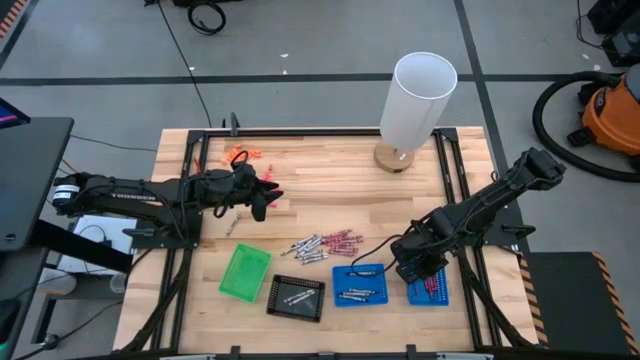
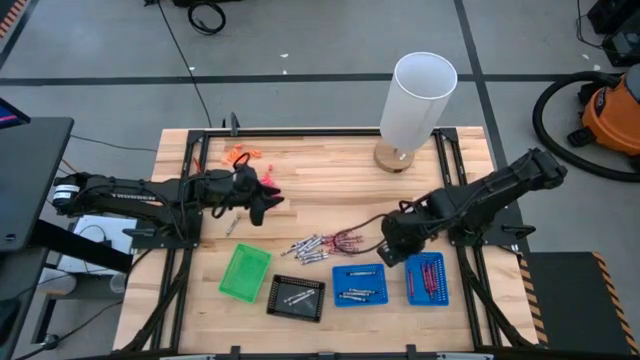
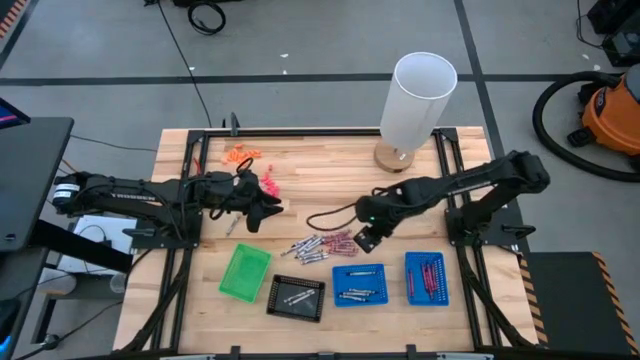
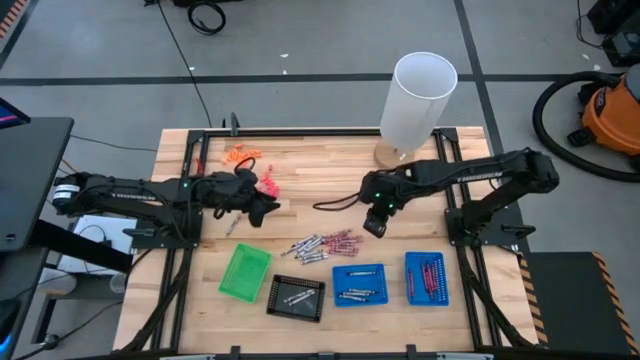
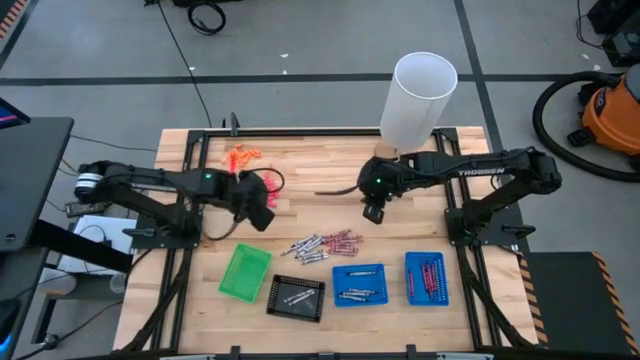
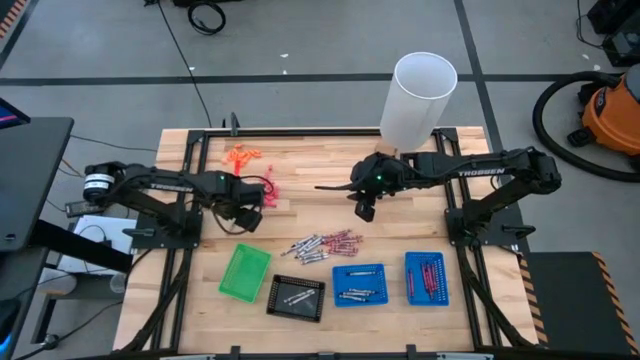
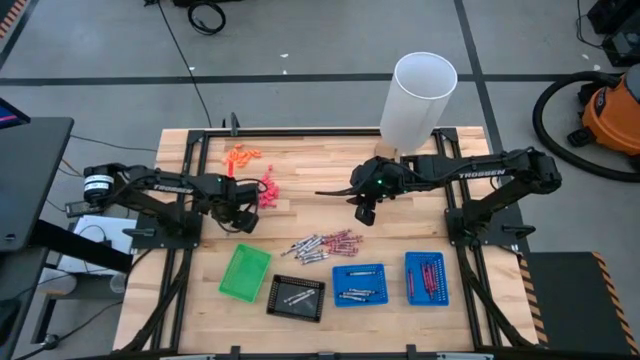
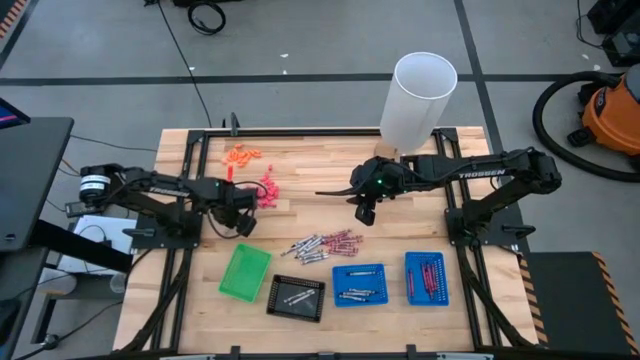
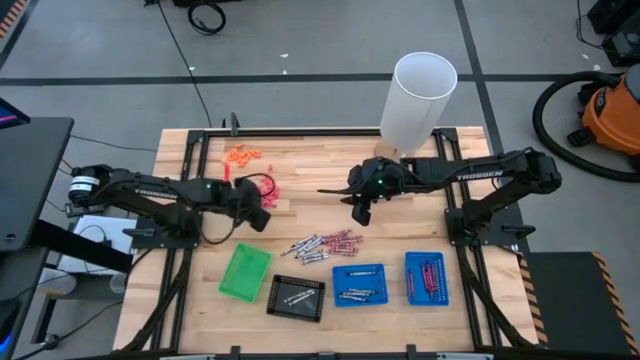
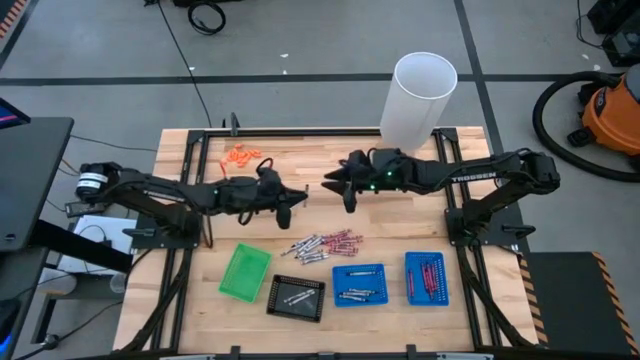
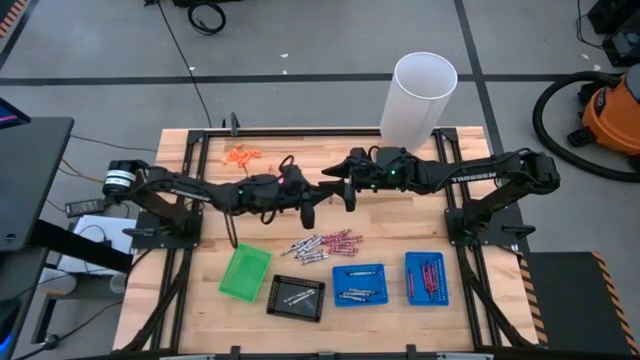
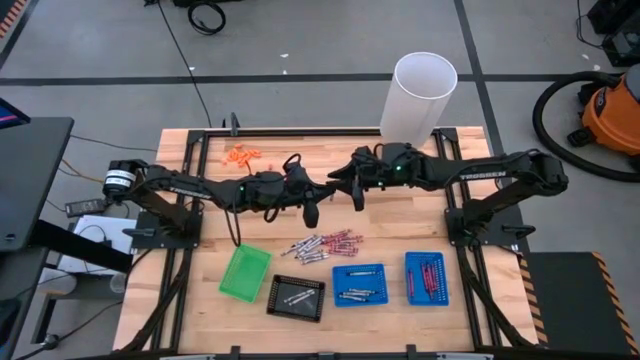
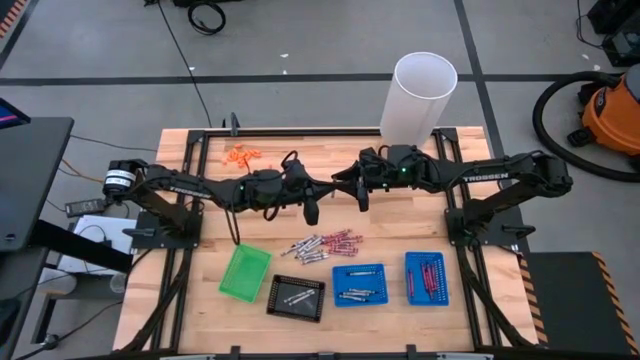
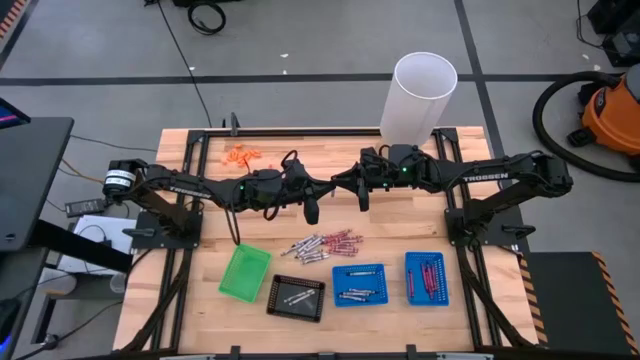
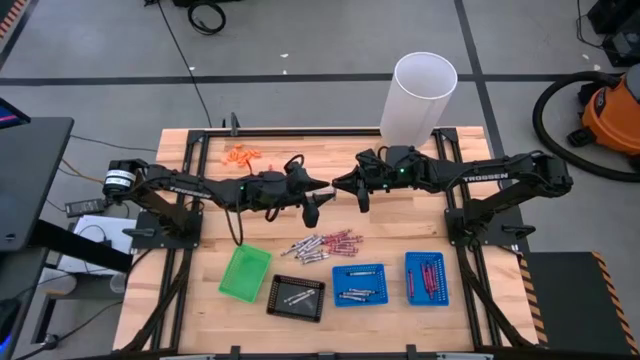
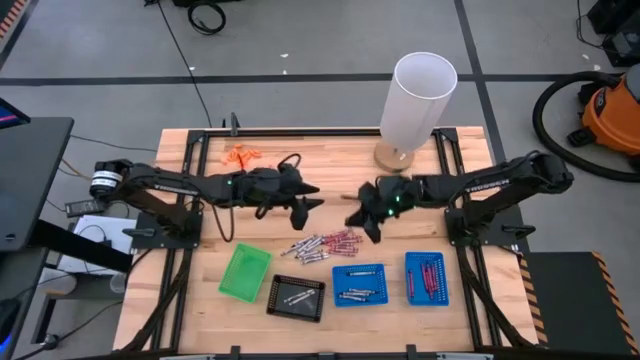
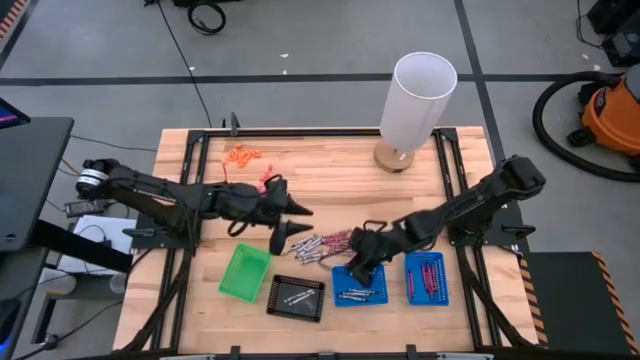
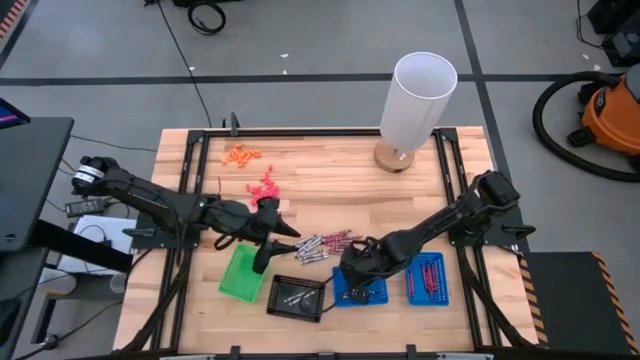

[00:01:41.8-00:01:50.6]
Task: Sort crayons
Put the black crayon into the left blue basket

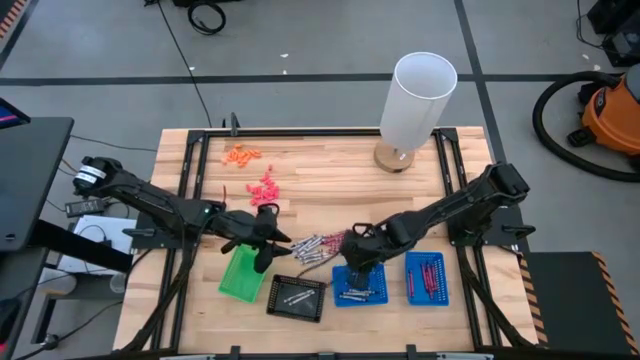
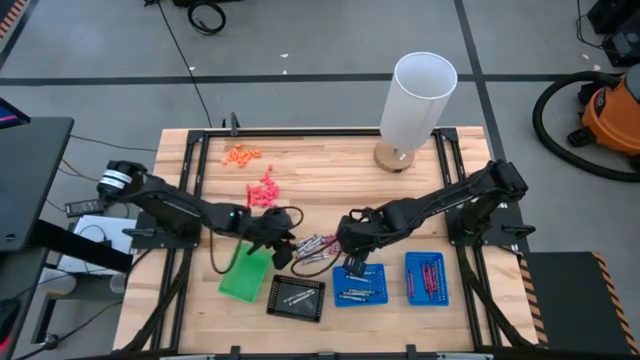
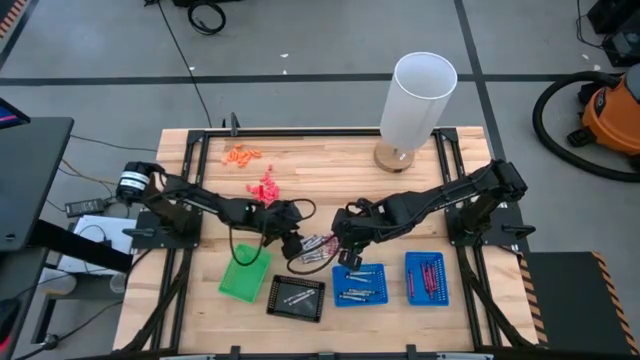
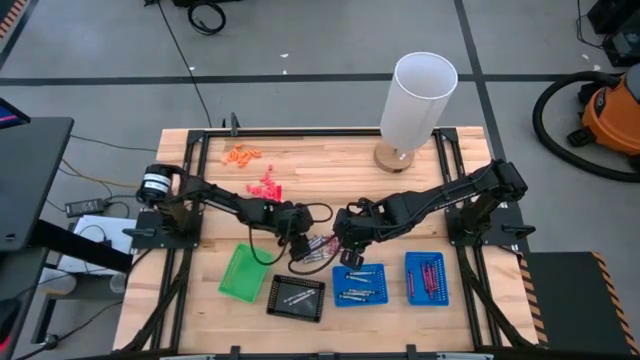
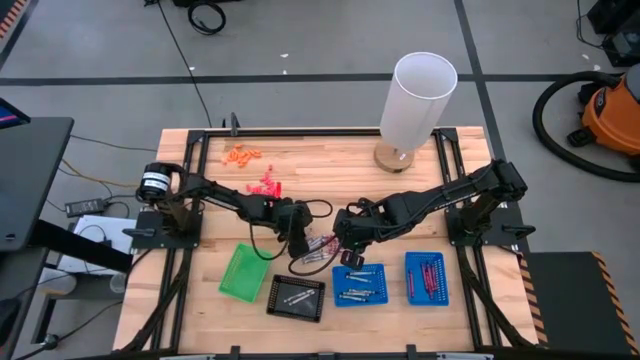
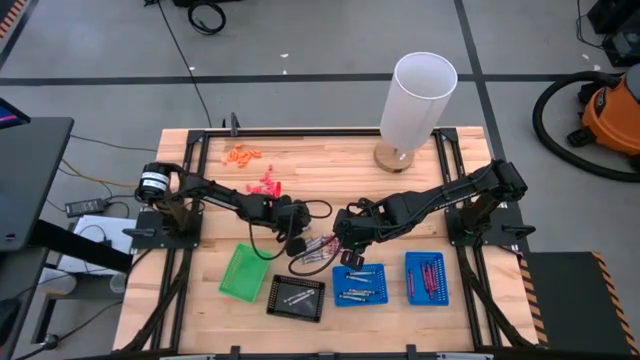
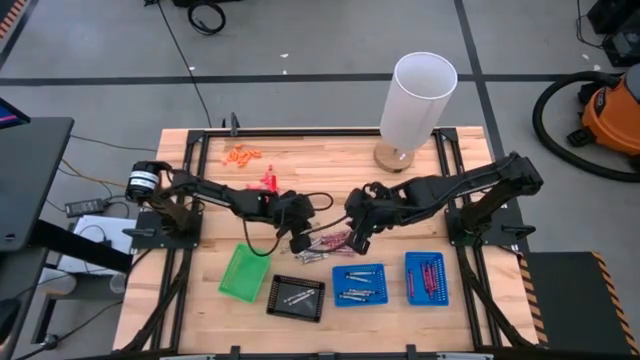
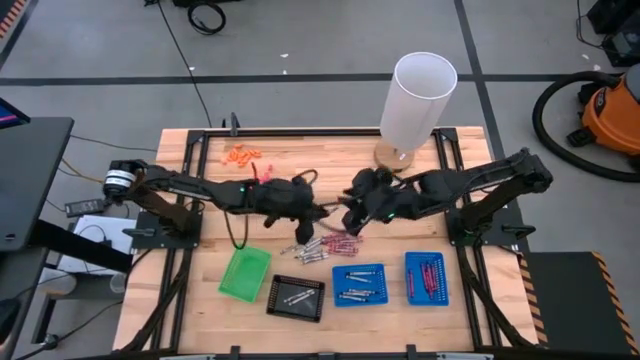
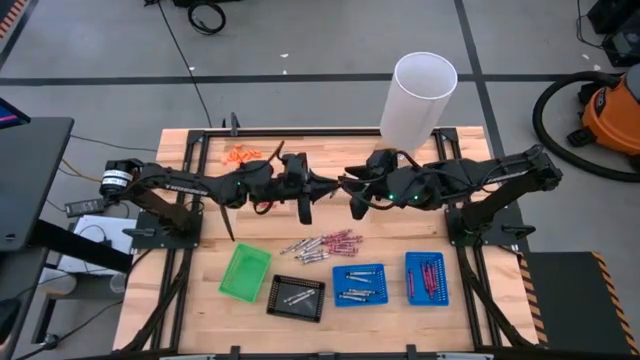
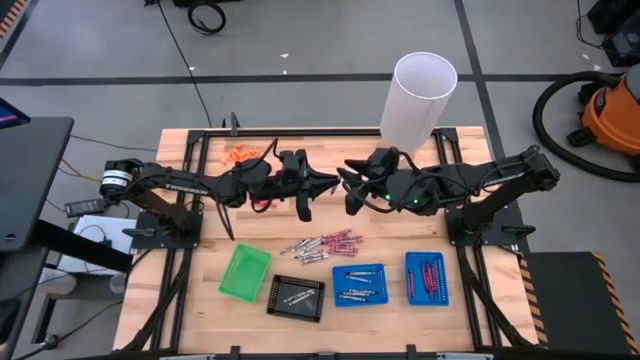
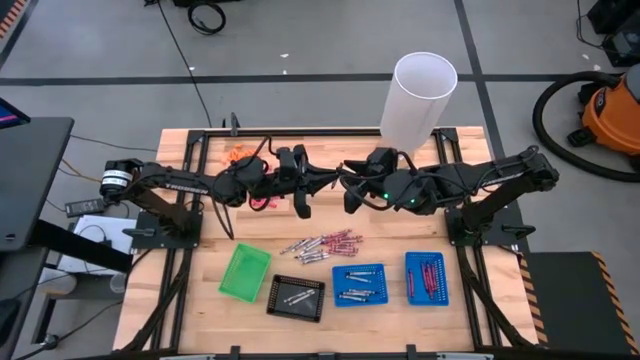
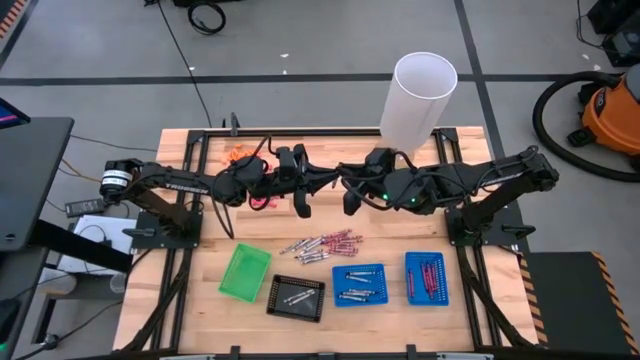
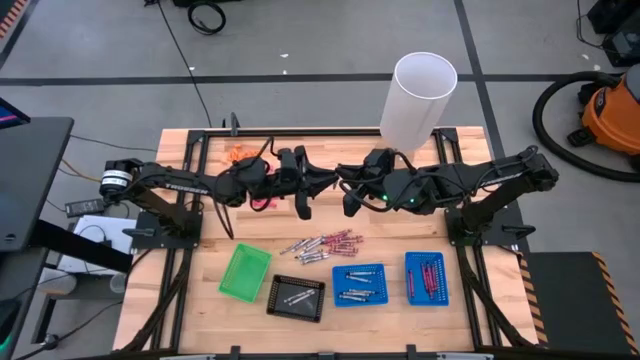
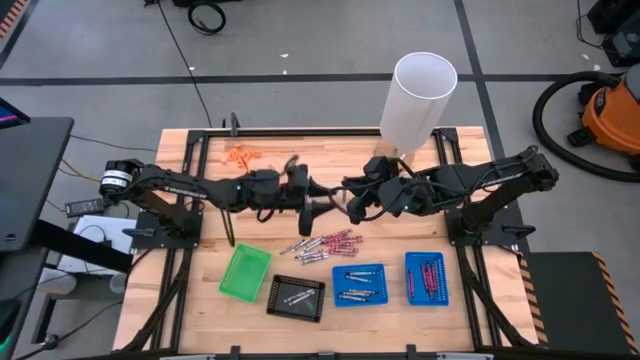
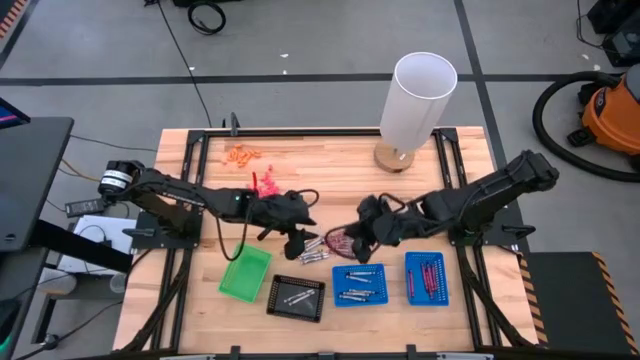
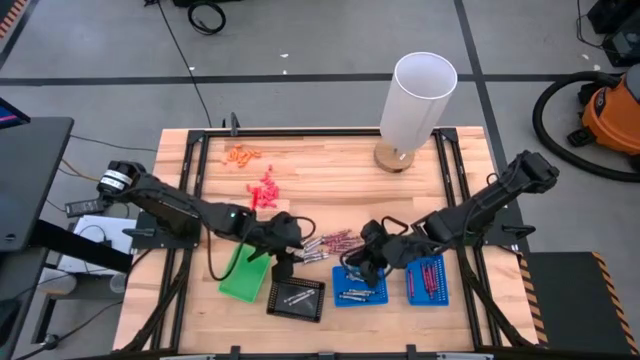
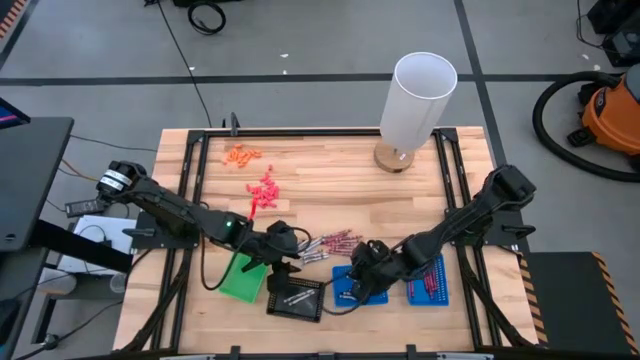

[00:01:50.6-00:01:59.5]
Put the black crayon into the left blue basket

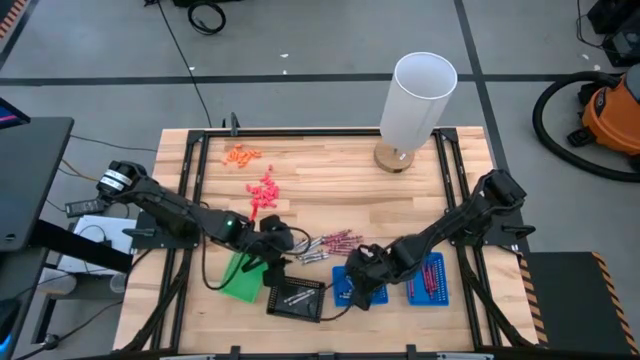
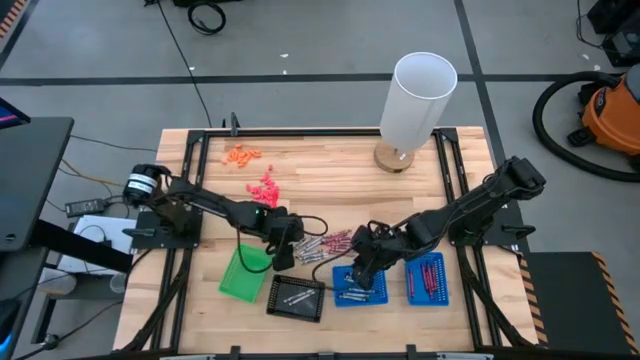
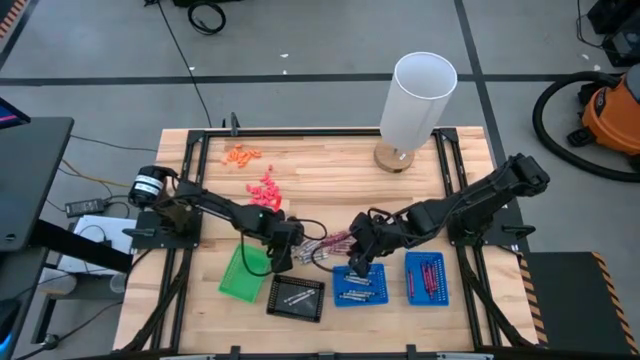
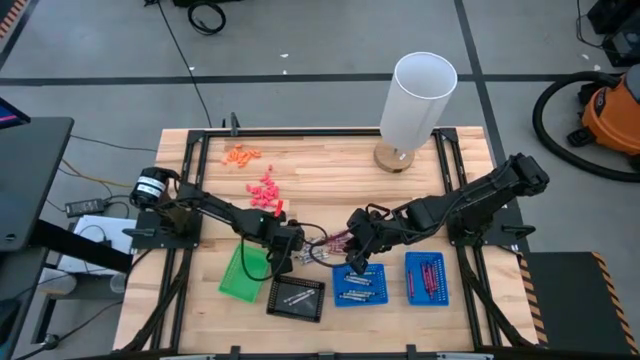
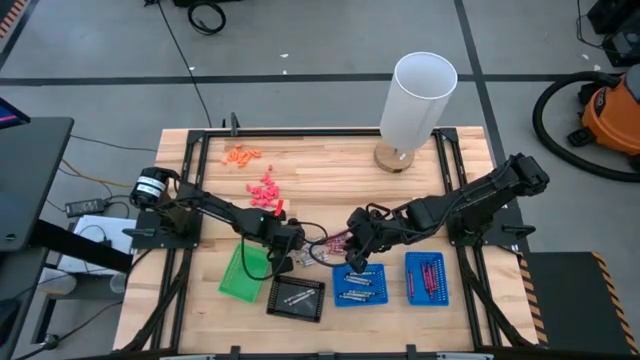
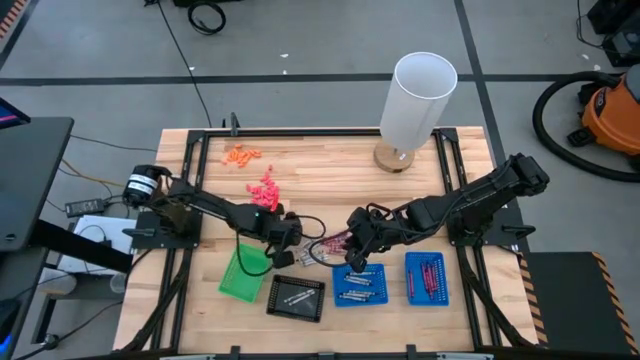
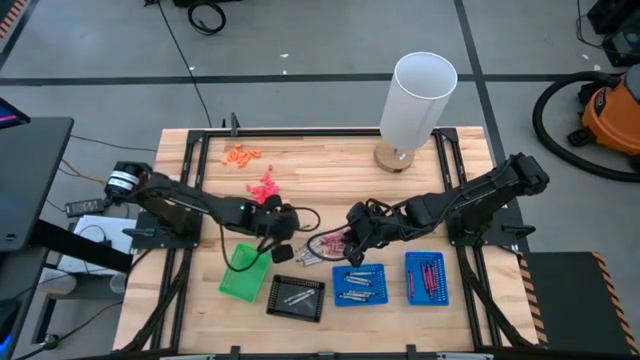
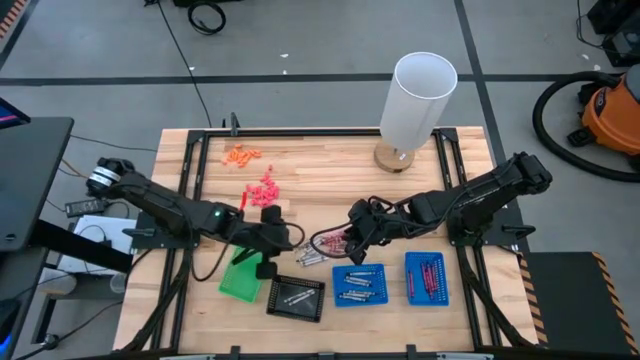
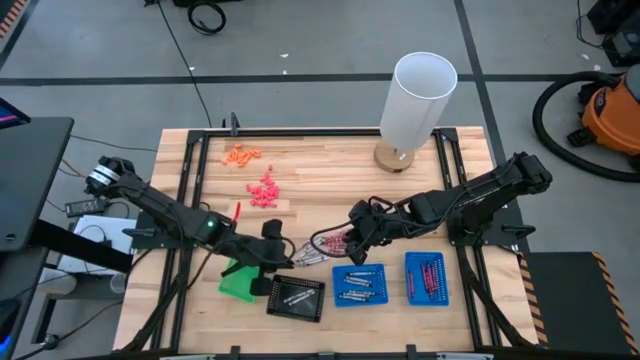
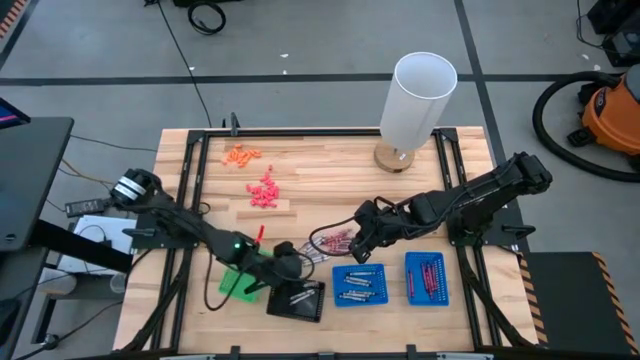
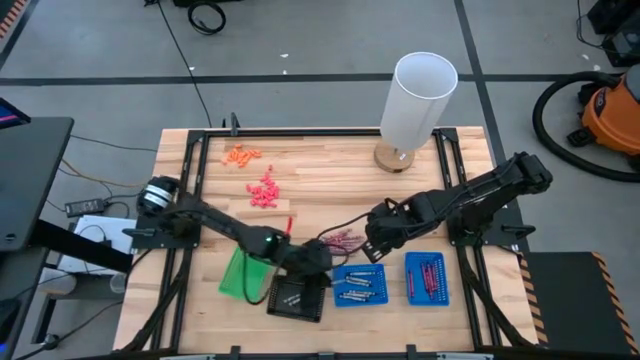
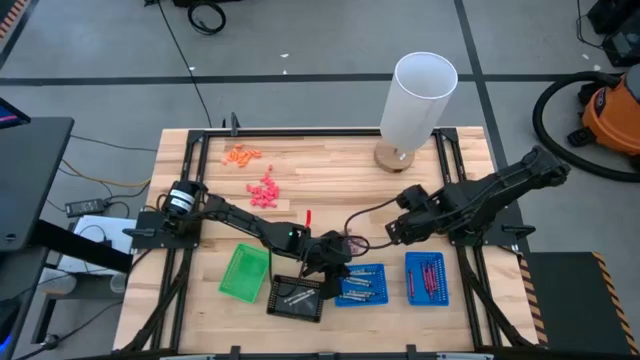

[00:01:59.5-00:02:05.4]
Put the black crayon into the left blue basket
